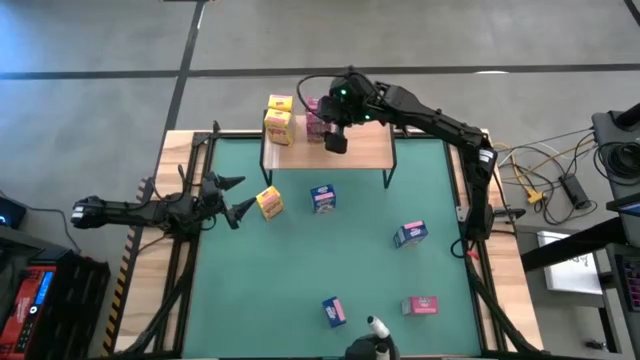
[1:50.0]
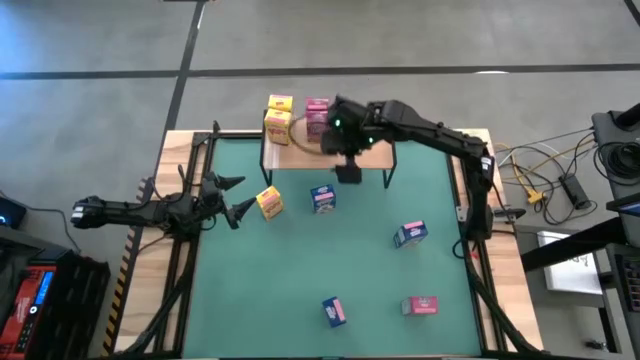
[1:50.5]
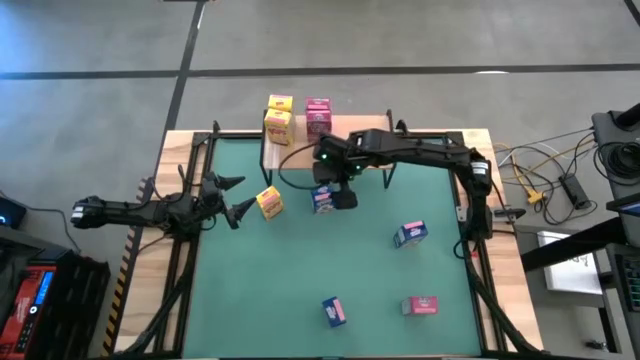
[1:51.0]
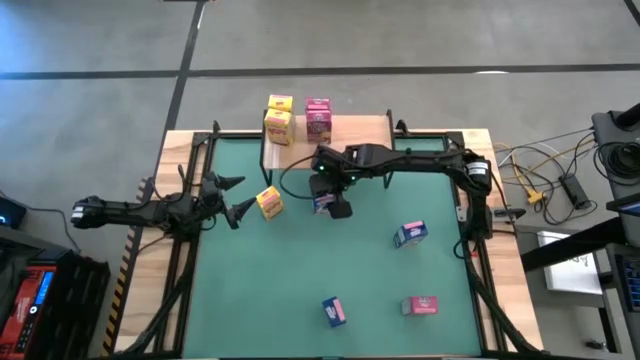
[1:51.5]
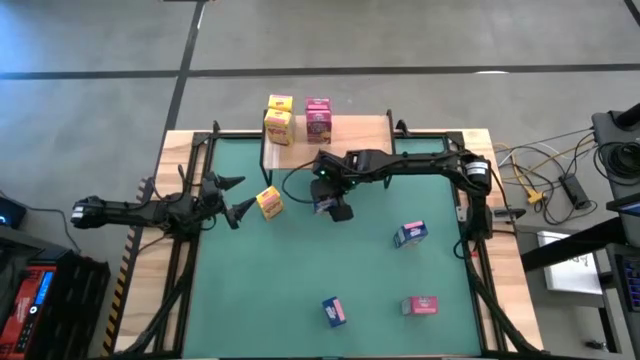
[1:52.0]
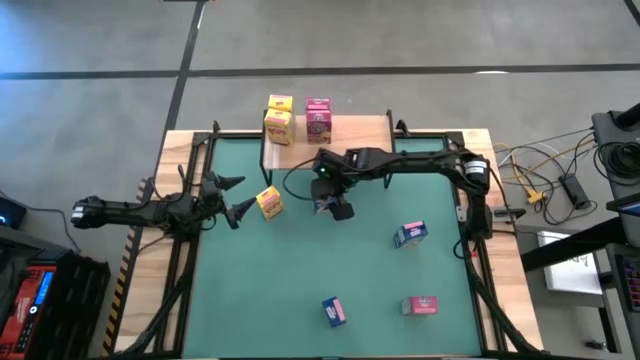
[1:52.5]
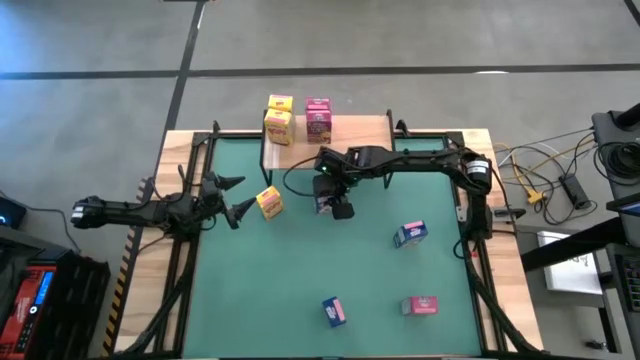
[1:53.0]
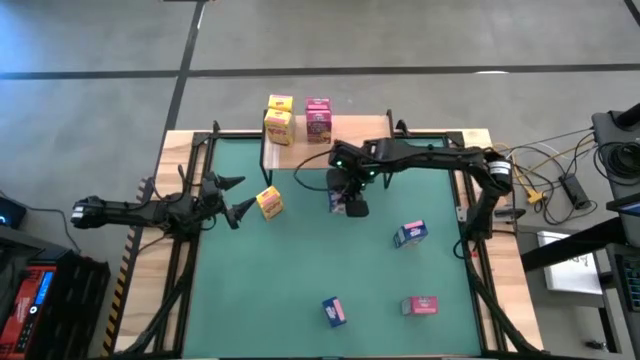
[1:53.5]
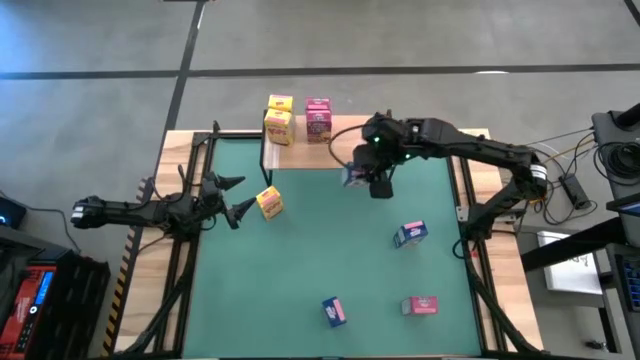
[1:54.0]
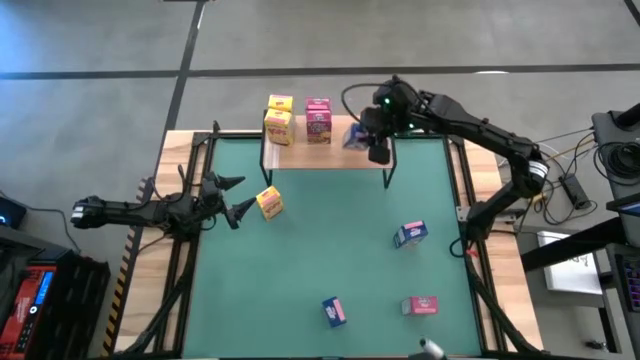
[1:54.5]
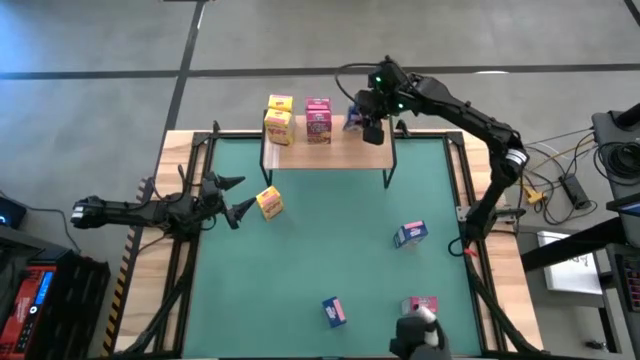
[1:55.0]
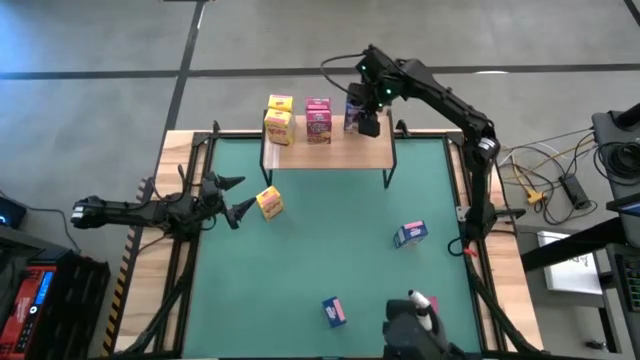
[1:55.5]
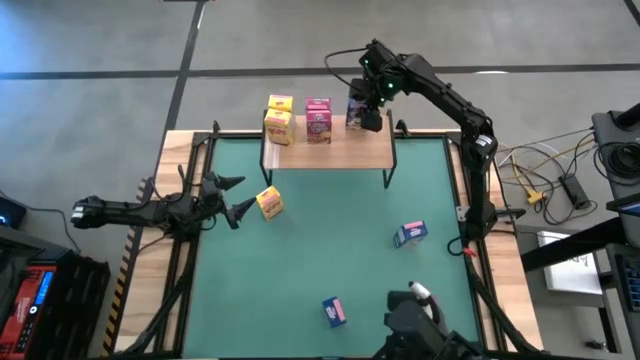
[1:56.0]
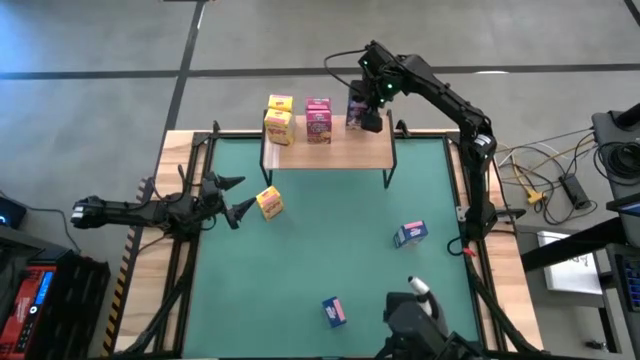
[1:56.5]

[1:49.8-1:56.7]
Task: Stack cereal on shelf
Put the top blue cereal box on the shelf

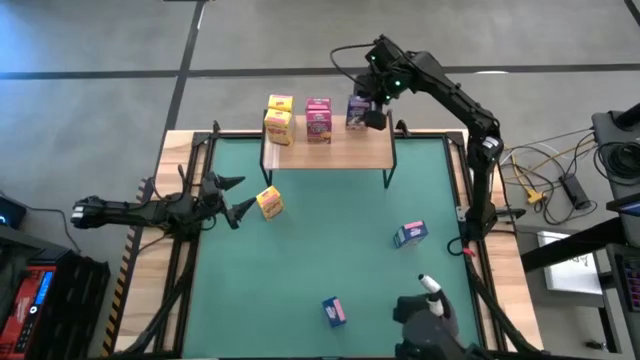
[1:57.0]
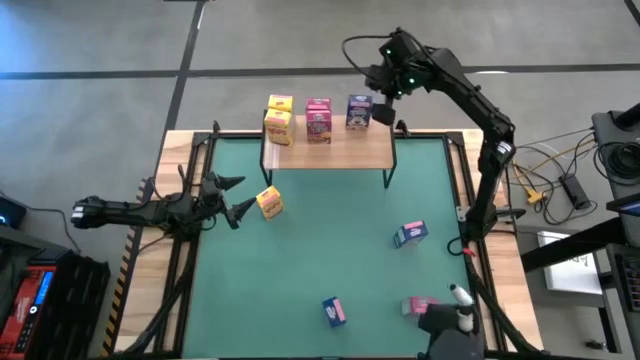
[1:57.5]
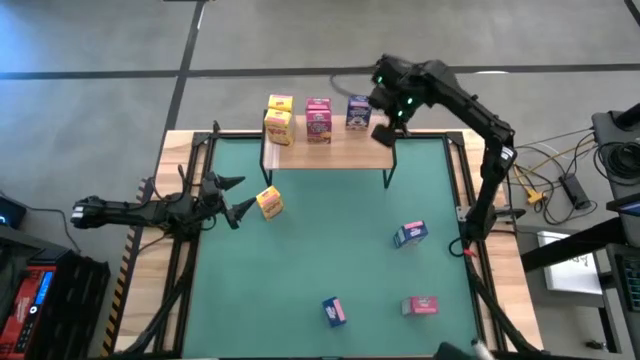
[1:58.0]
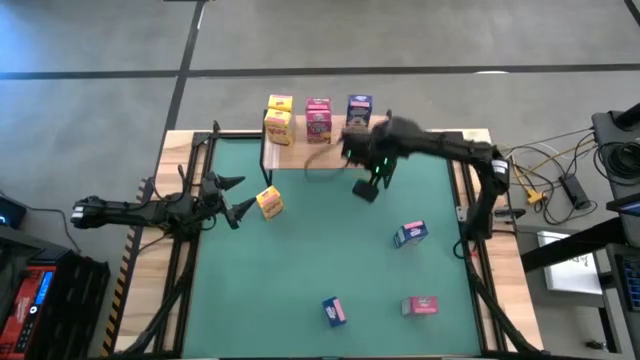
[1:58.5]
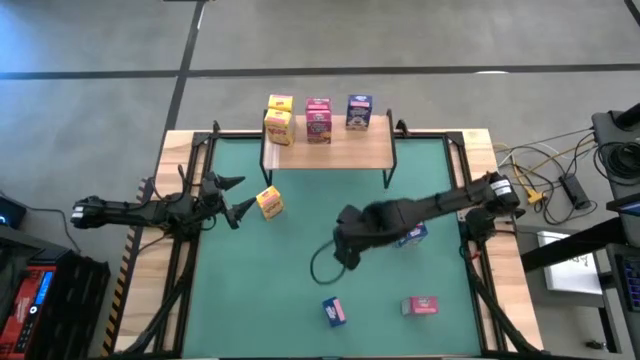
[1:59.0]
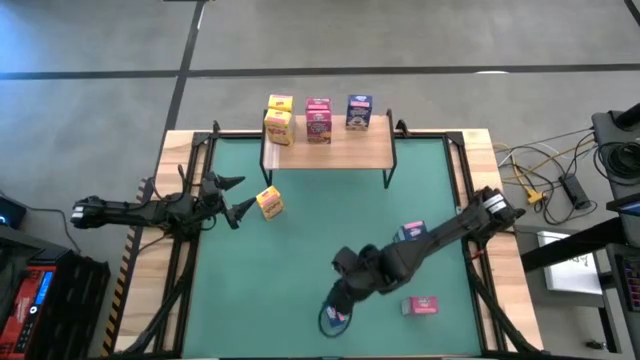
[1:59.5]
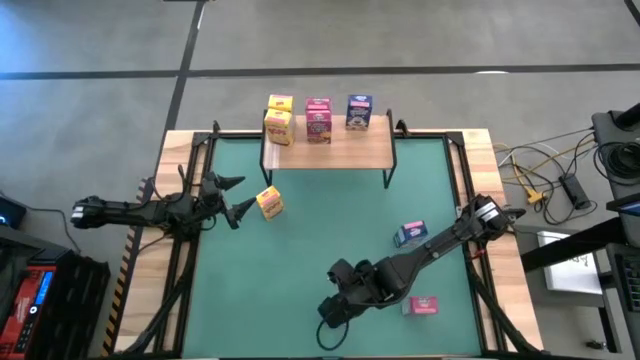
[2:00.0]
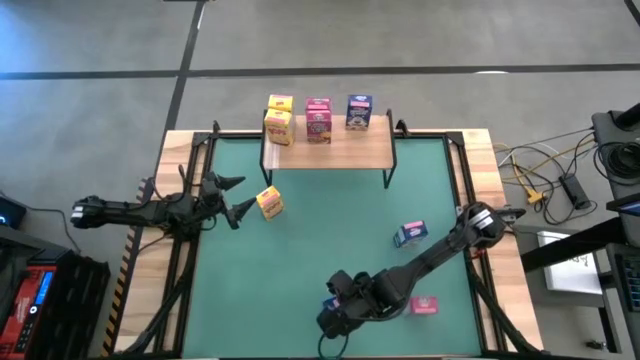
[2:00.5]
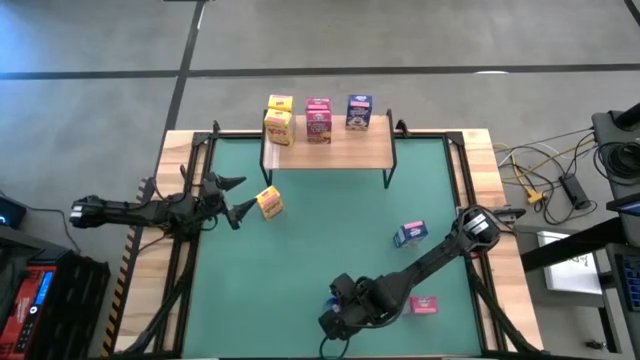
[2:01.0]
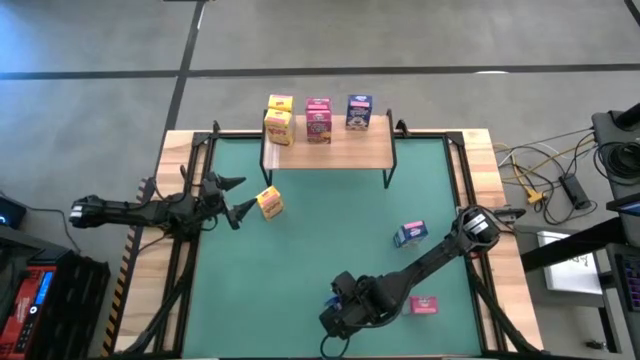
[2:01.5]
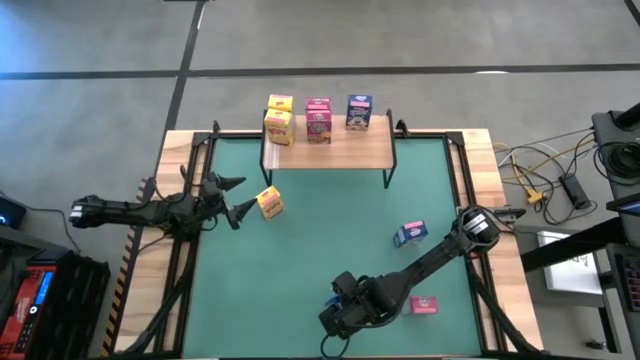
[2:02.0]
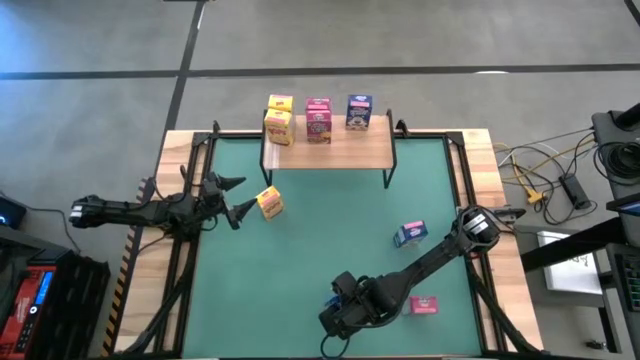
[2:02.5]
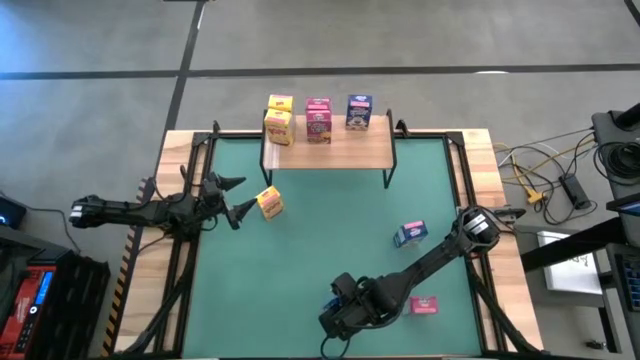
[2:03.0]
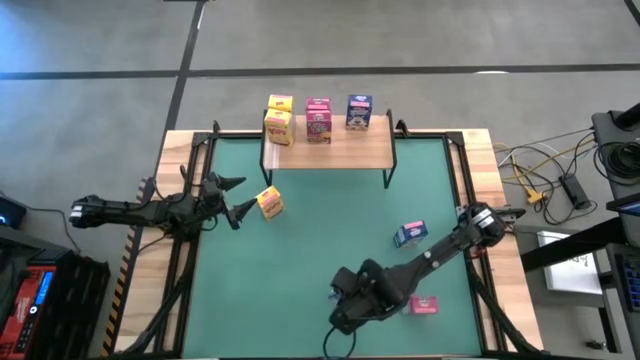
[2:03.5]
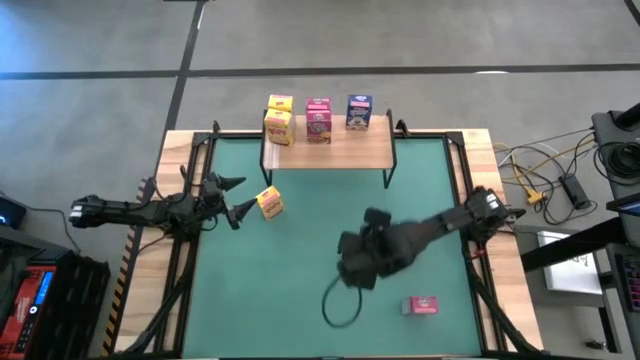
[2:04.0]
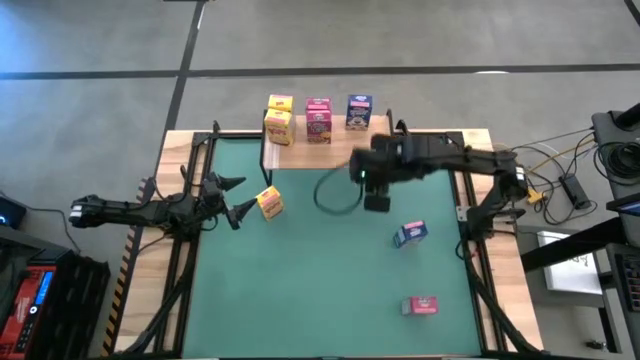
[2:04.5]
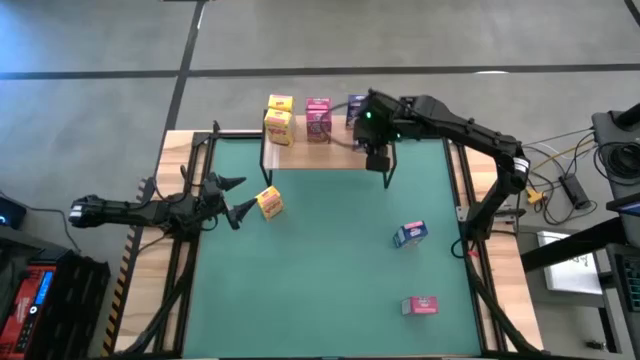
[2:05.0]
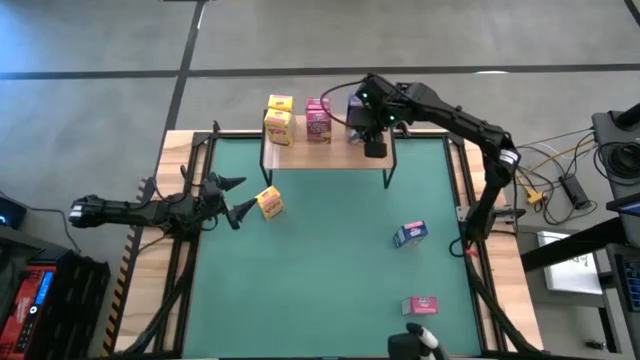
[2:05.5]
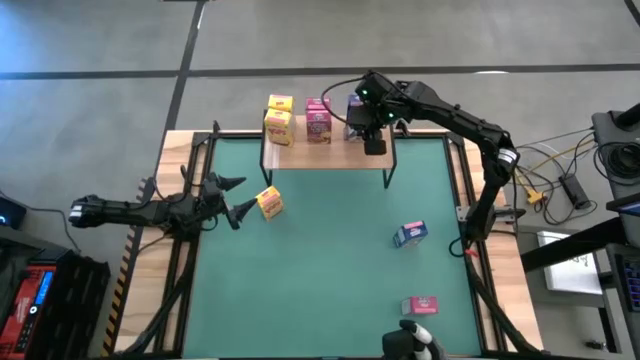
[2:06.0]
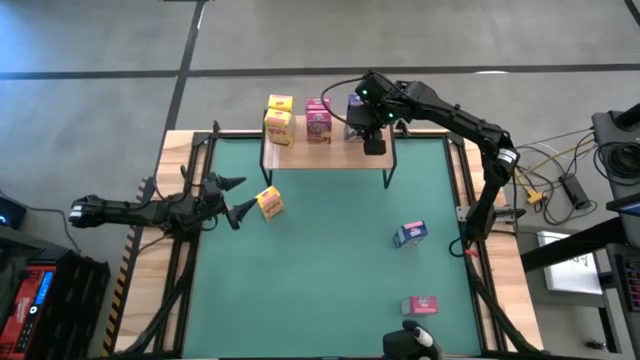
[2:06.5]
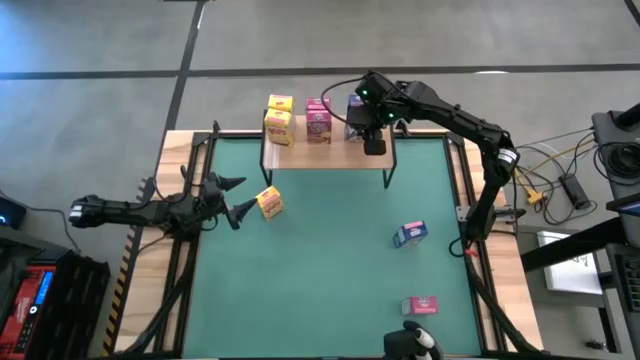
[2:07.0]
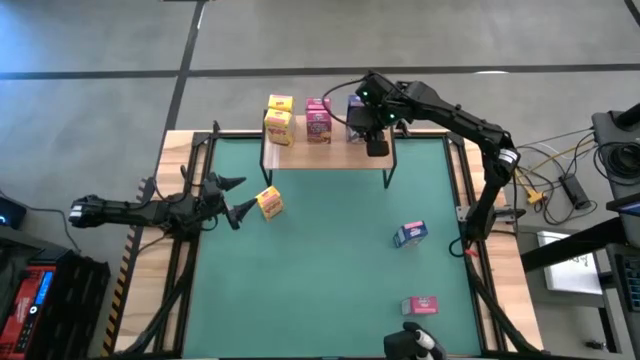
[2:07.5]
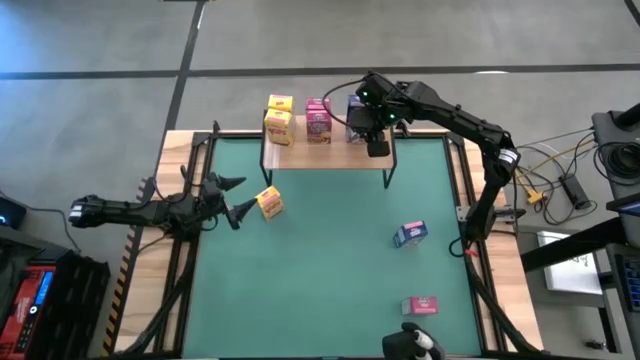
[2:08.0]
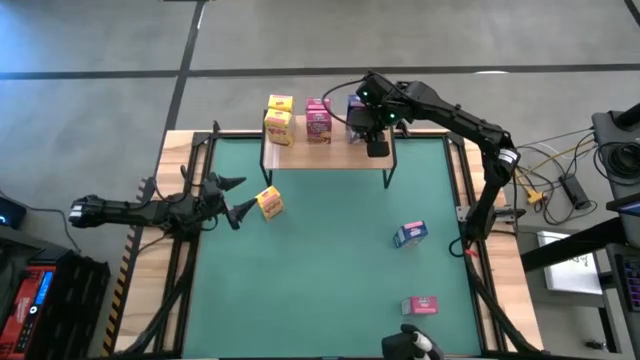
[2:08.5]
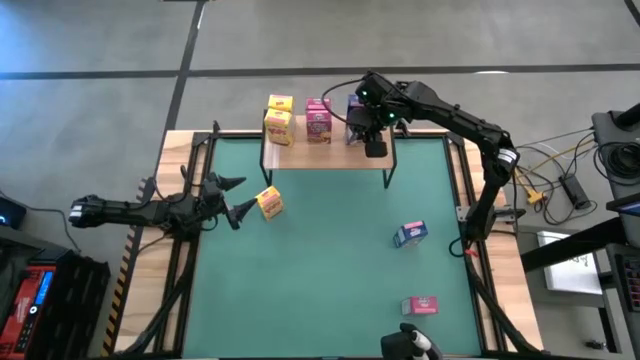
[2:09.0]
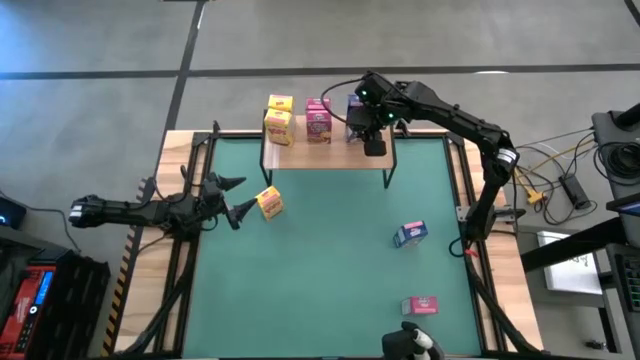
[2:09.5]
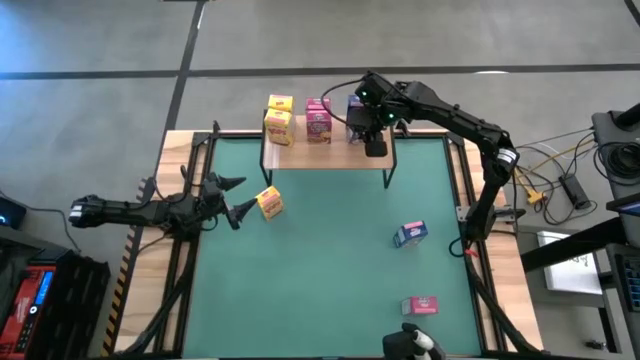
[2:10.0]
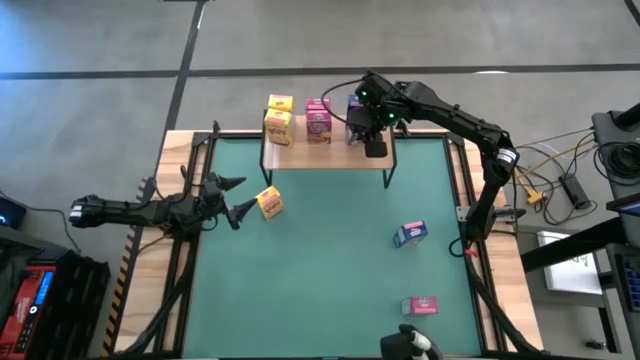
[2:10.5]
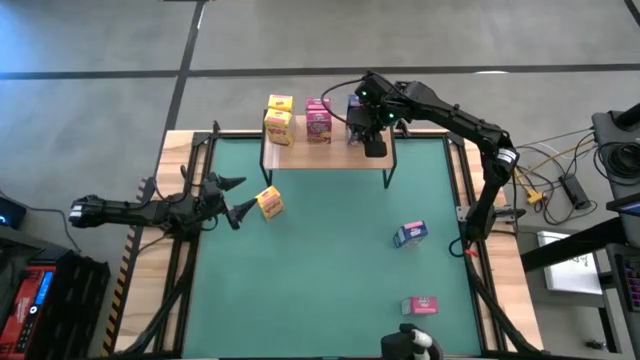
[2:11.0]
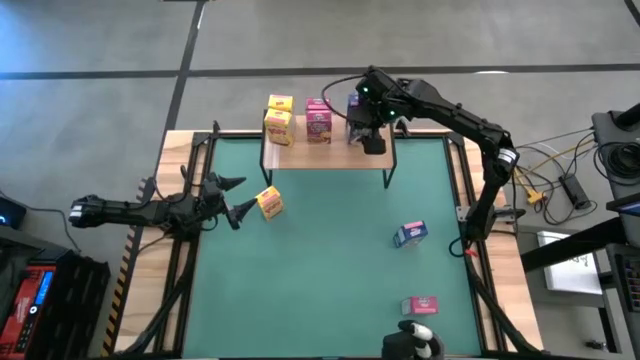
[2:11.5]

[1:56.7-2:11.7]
Put the bottom blue cereal box on the shelf
